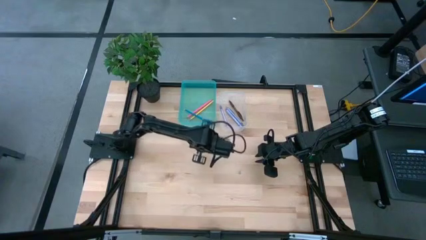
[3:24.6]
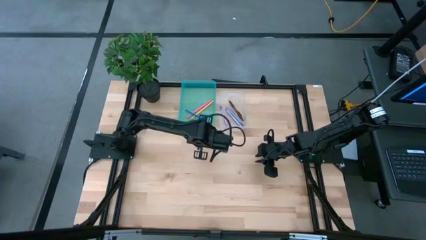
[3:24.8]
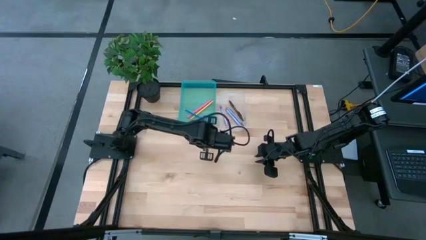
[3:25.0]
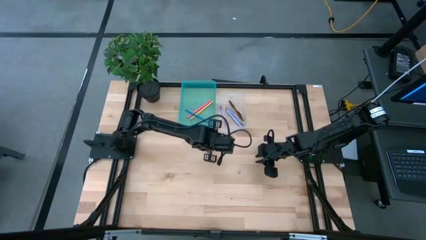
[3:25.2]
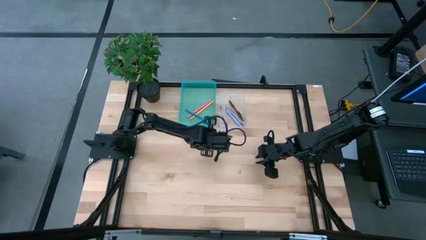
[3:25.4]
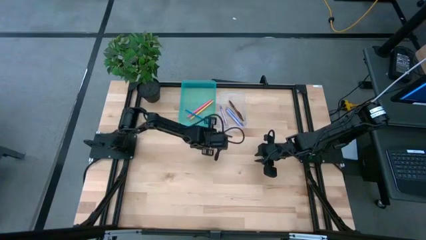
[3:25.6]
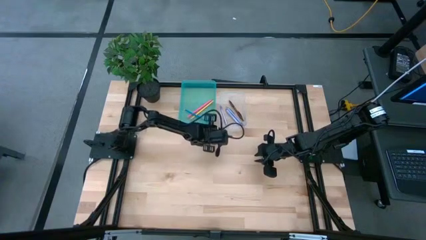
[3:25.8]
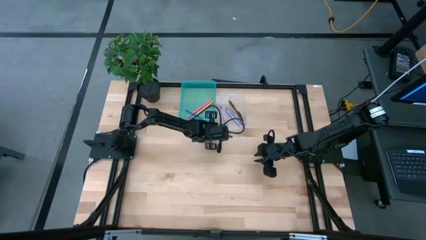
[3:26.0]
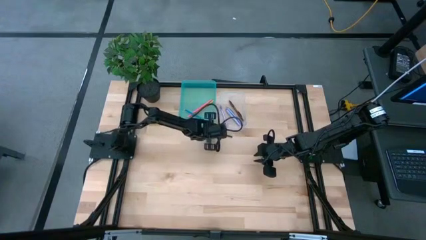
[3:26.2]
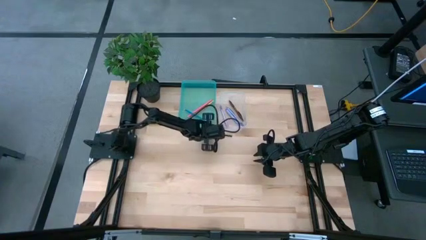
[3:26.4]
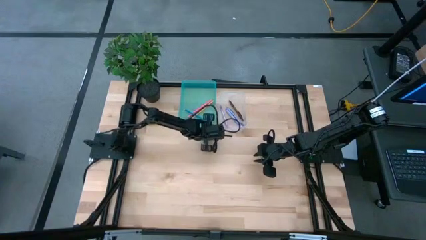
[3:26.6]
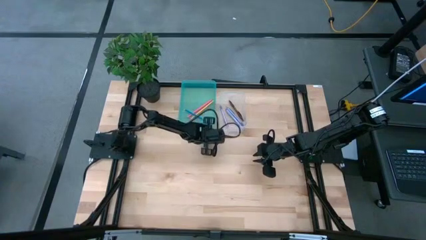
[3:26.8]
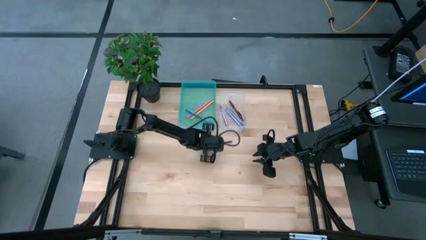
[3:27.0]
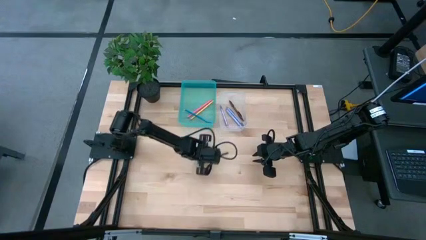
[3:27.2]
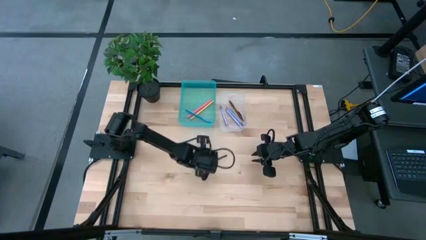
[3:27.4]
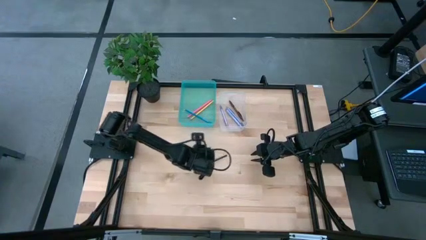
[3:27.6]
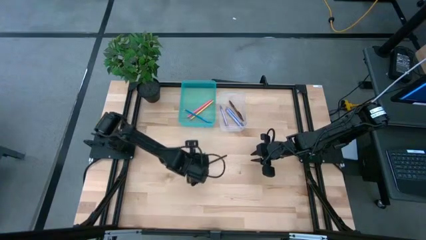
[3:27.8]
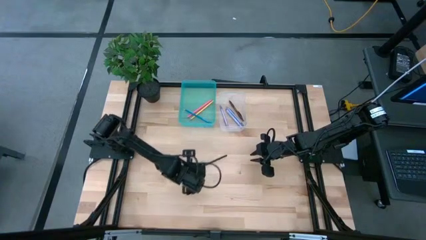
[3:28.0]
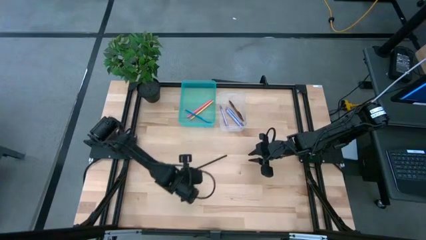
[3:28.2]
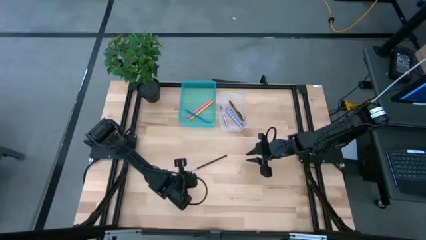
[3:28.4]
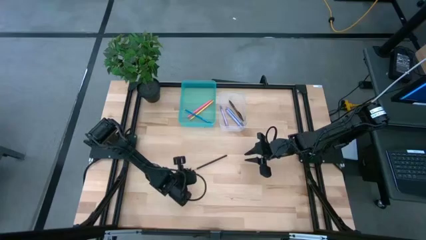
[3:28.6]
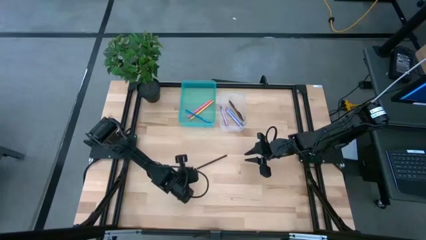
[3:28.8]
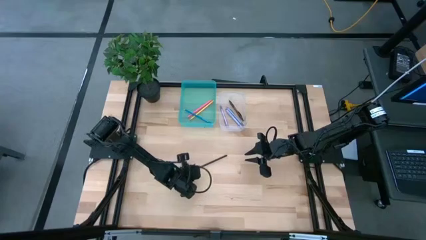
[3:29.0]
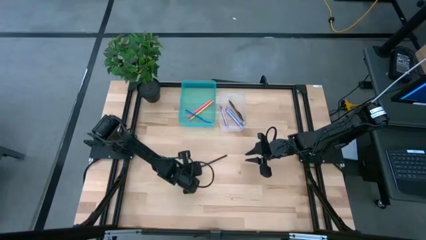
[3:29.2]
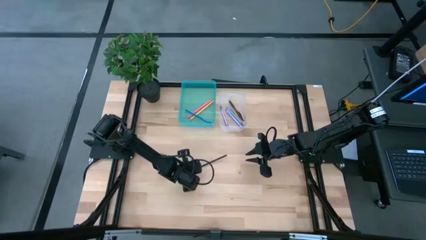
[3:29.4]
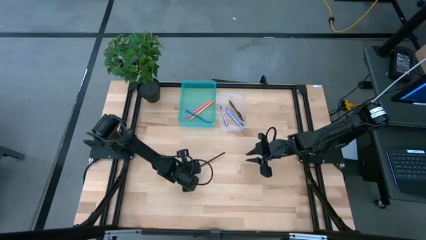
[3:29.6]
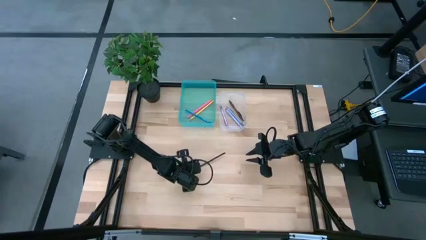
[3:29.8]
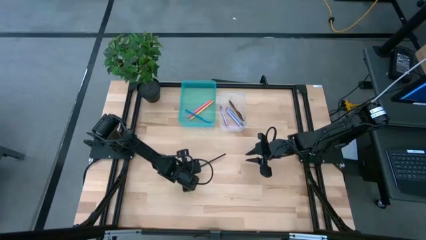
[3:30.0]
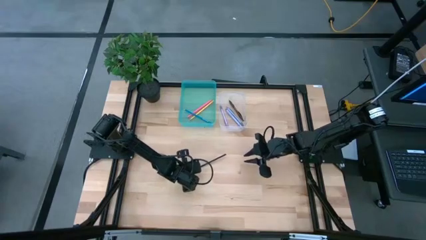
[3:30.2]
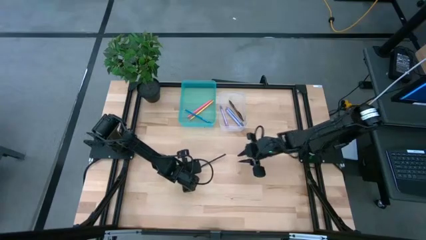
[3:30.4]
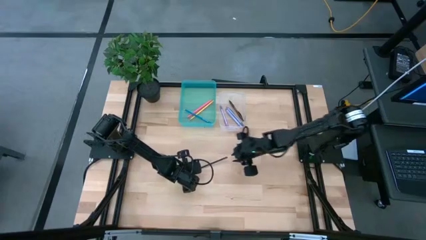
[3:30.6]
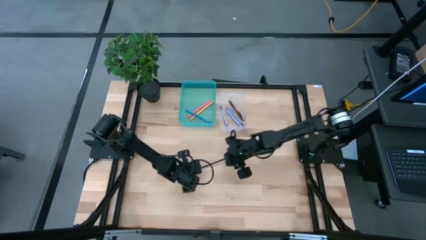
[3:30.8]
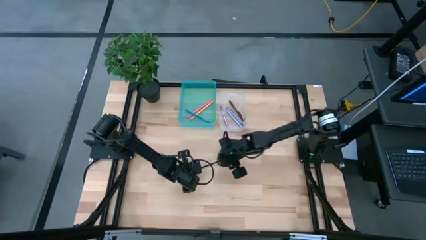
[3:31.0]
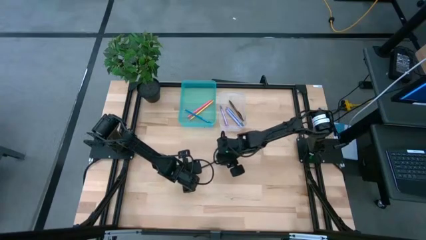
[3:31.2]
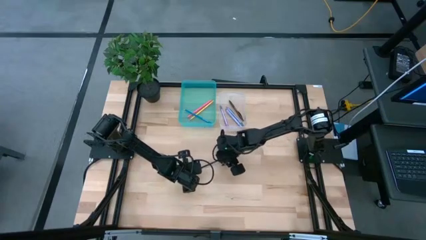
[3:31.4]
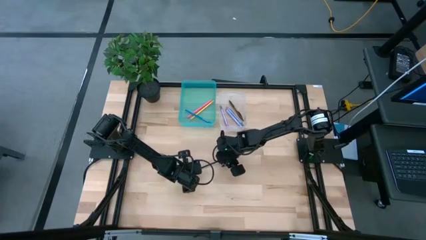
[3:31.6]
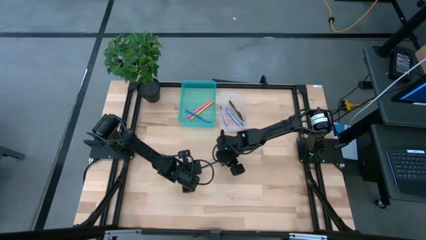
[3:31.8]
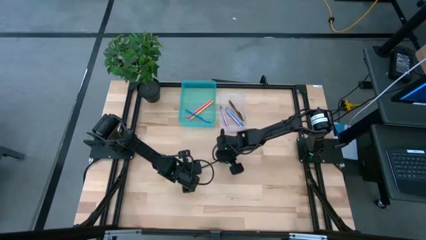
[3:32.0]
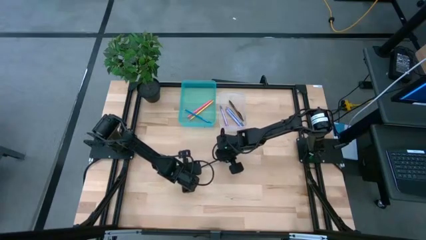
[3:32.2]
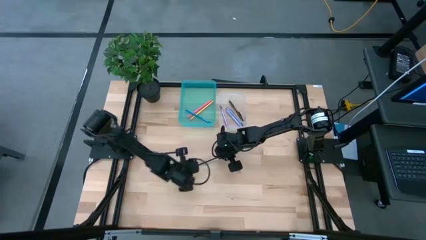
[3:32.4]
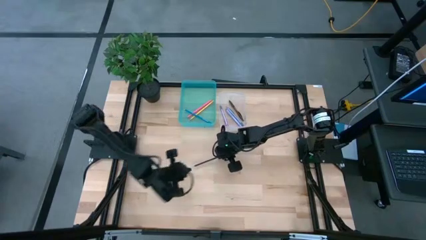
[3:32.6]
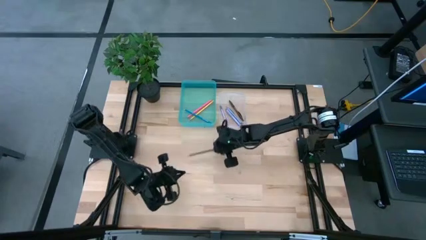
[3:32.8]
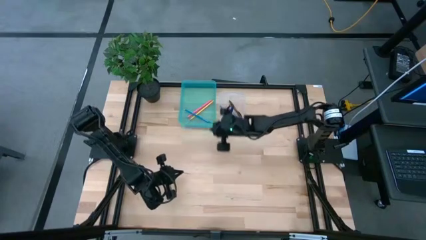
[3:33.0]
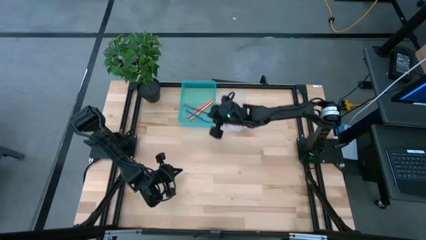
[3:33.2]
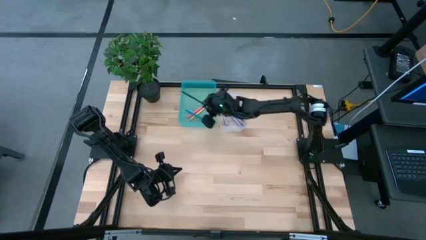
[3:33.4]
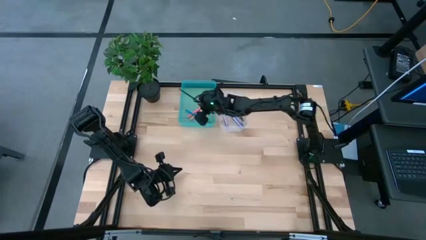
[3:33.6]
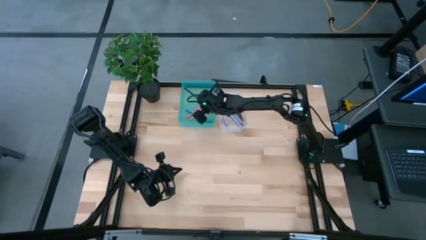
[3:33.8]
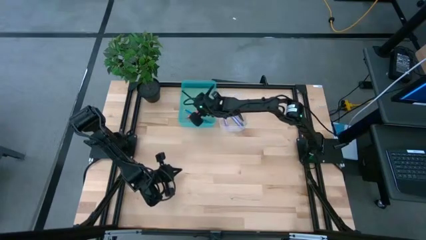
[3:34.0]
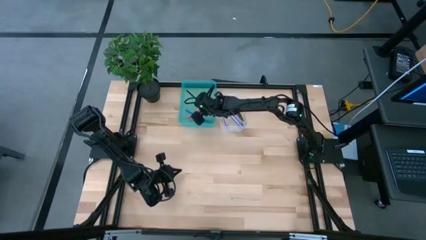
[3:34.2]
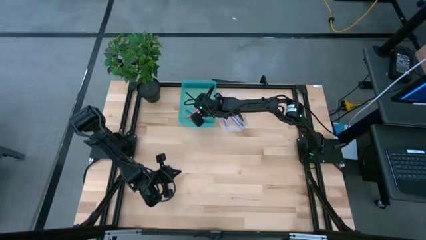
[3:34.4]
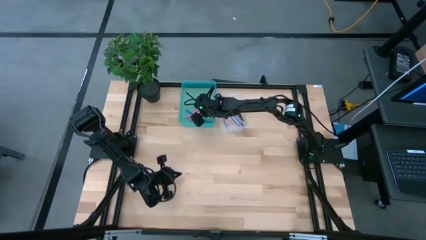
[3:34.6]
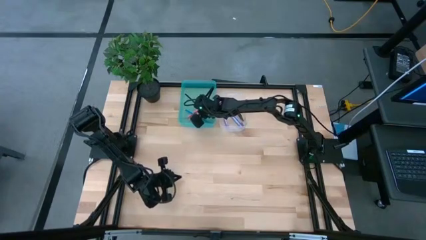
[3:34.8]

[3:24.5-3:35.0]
Task: Sort pens & pencils
Put the black pencil into the blue bin

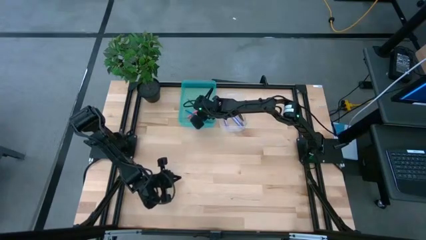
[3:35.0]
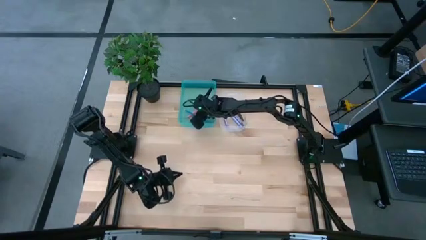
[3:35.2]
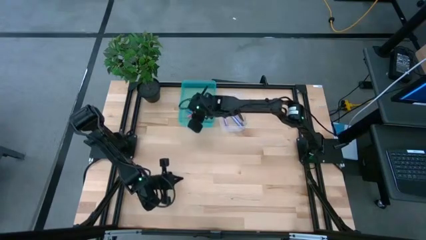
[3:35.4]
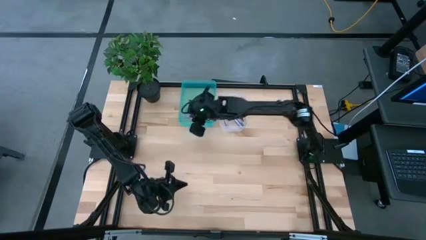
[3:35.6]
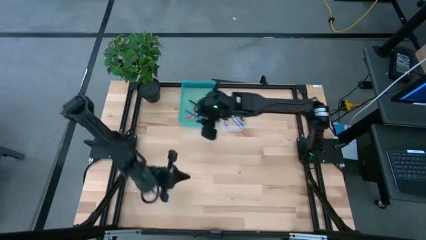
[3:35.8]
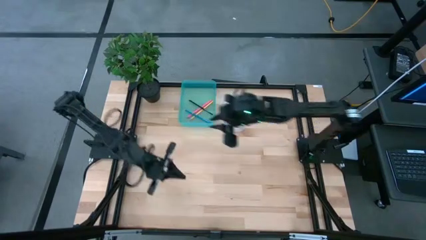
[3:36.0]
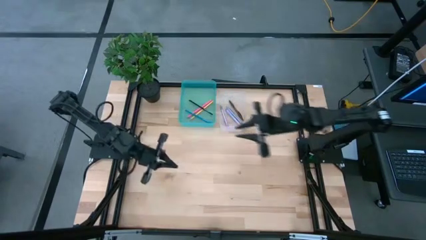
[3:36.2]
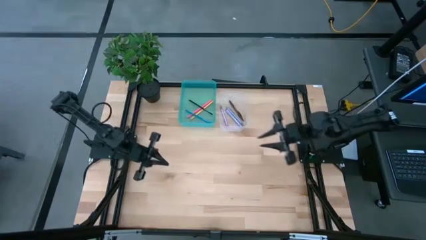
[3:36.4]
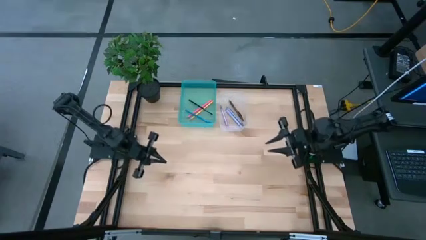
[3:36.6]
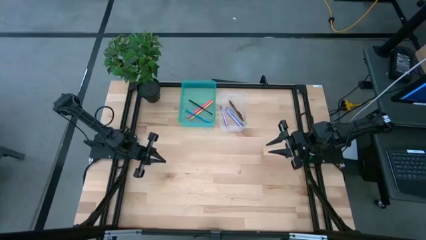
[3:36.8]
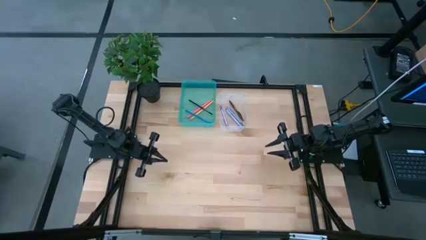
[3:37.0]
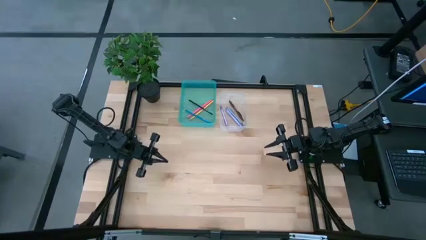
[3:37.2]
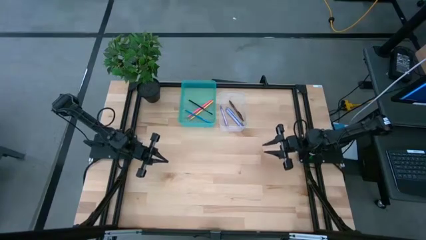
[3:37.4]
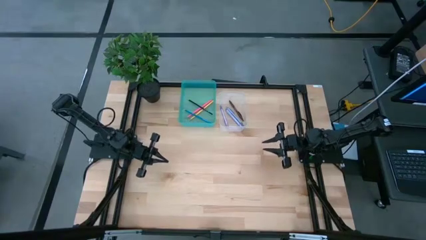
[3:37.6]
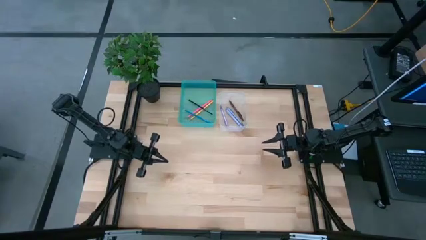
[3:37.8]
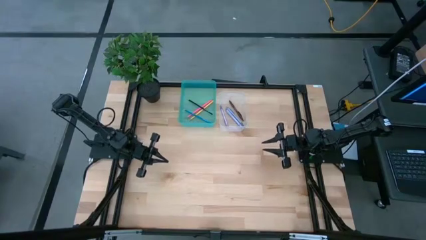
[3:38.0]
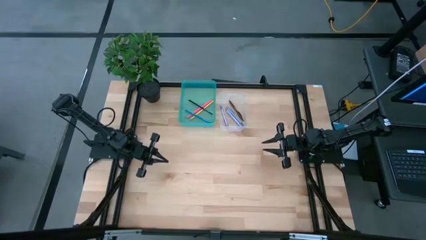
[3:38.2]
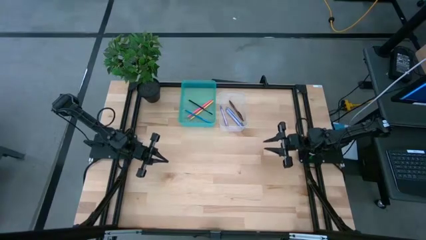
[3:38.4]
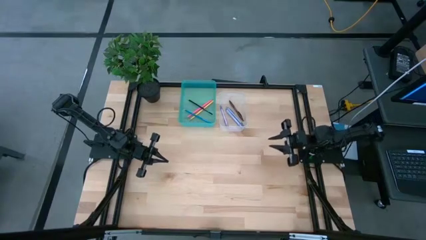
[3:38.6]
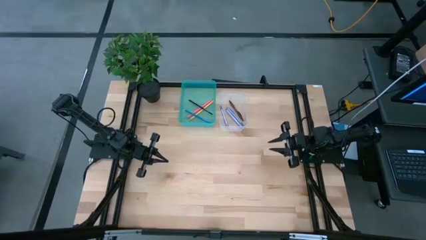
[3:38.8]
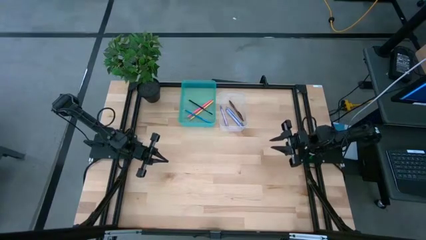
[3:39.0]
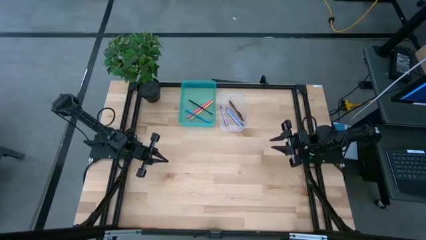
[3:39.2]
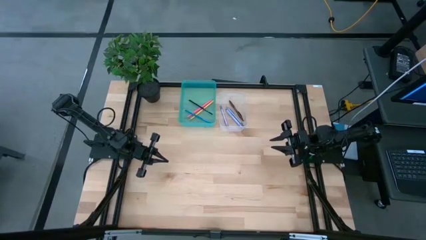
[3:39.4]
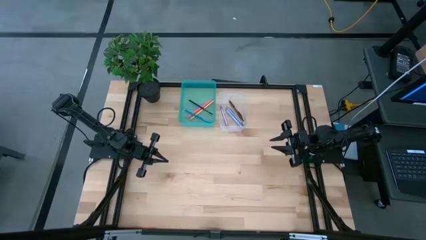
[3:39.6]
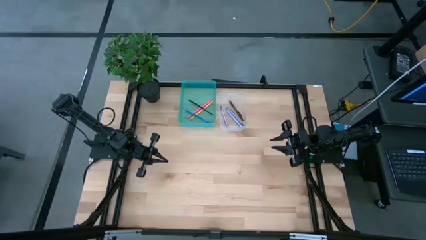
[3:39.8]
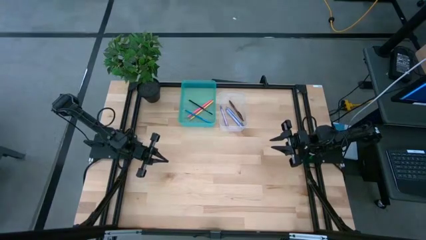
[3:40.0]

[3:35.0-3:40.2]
Return to Home Position
